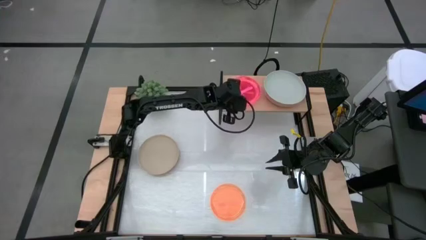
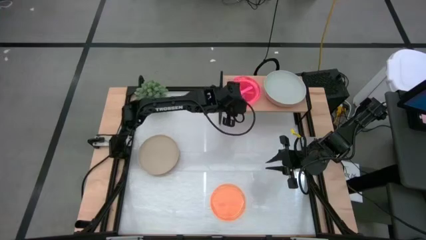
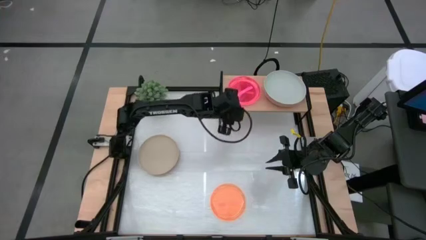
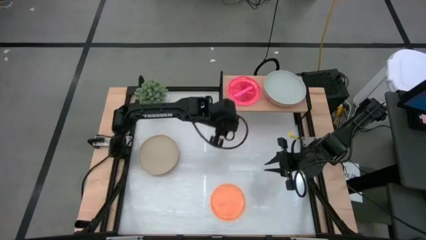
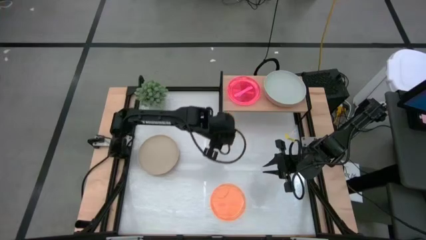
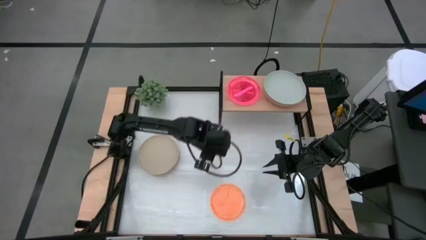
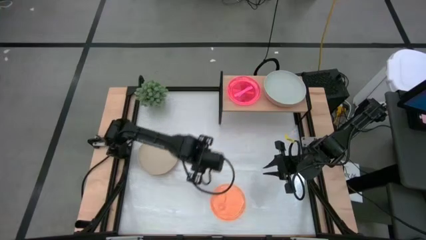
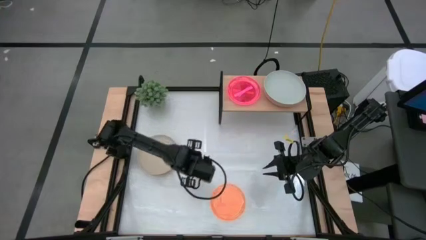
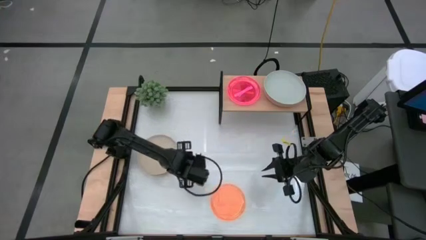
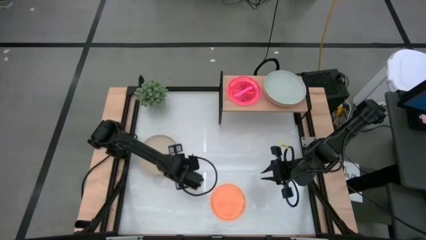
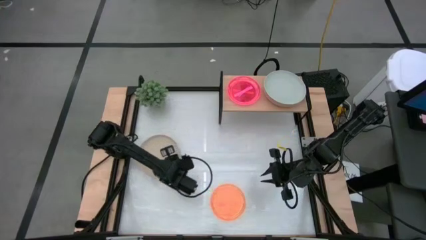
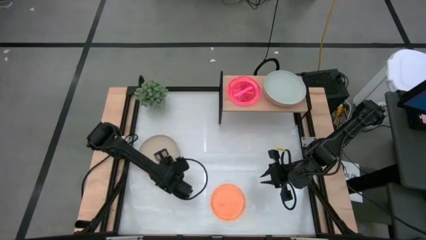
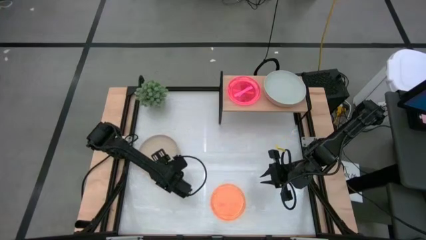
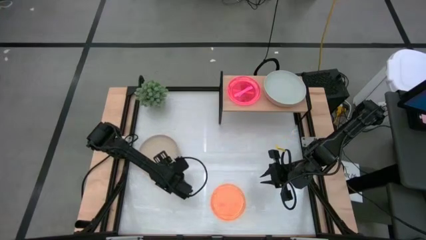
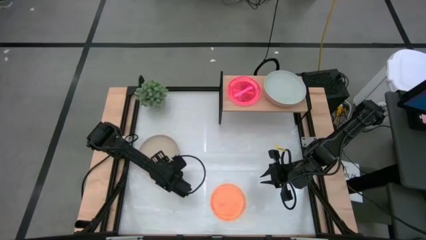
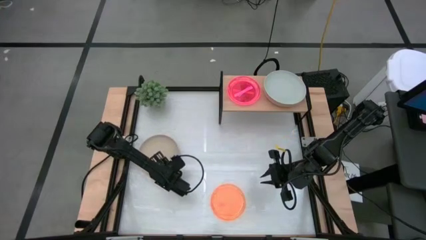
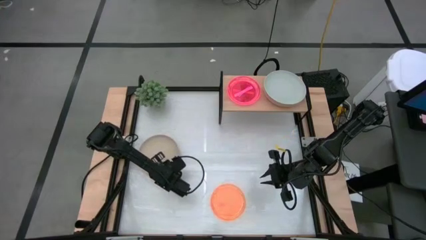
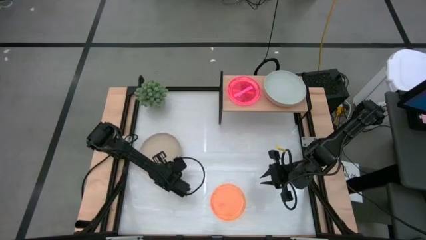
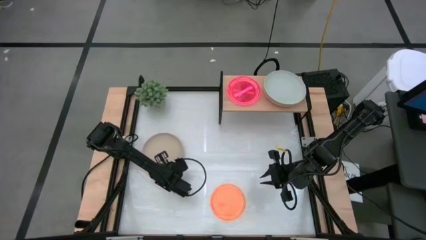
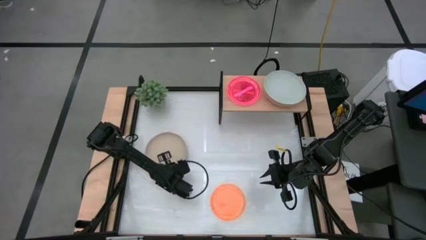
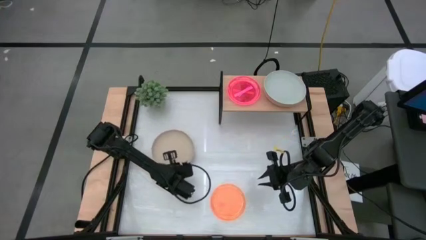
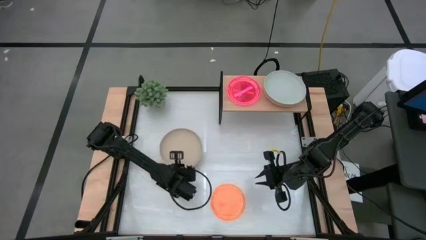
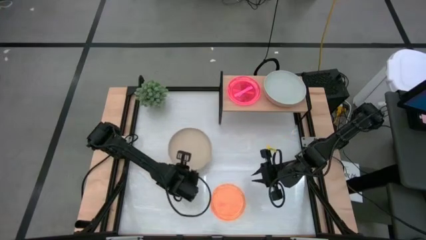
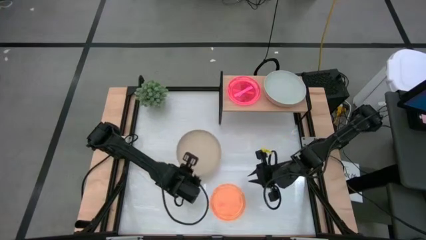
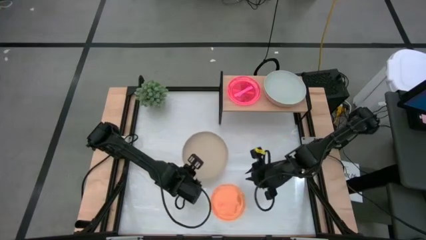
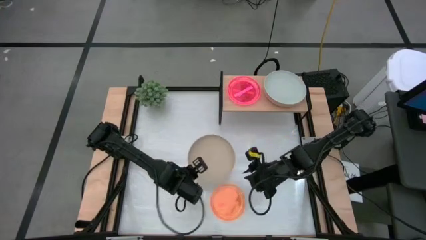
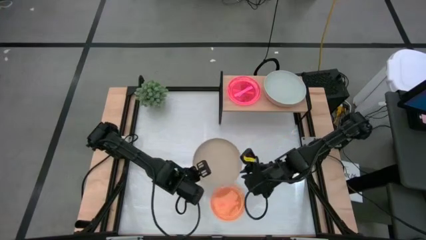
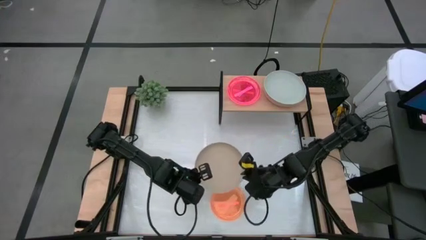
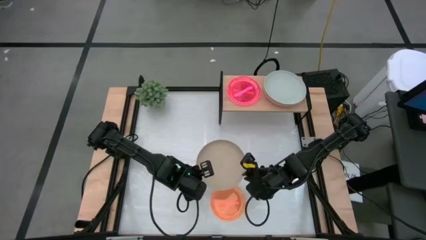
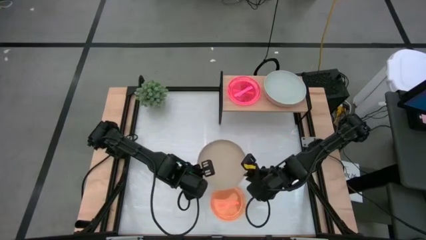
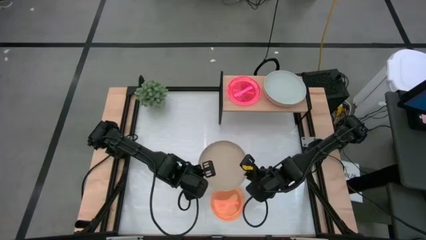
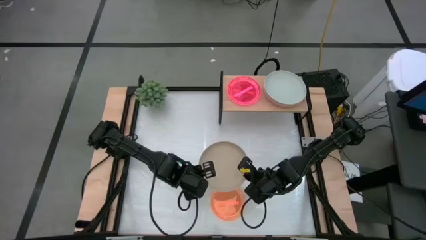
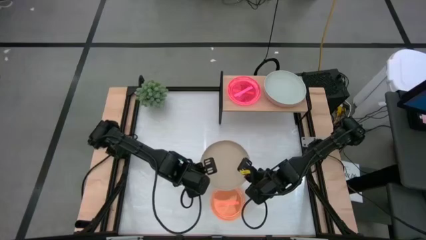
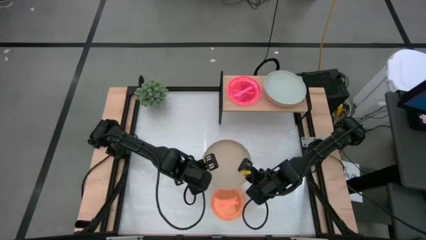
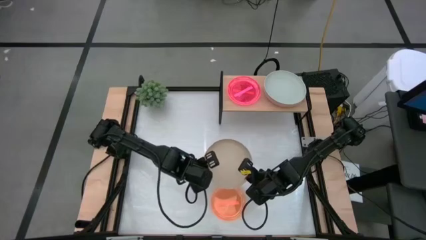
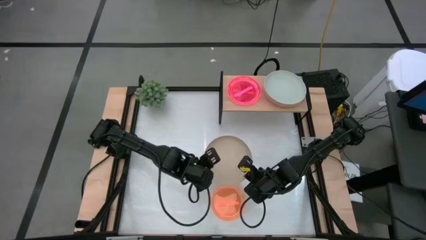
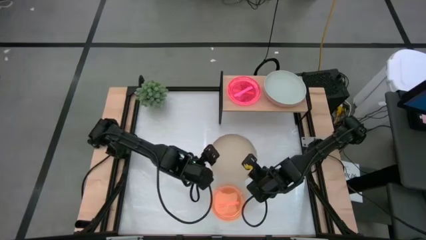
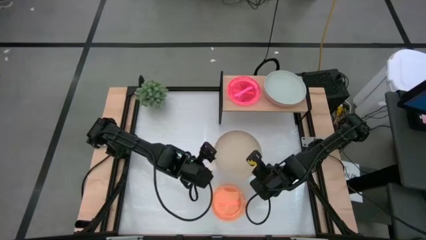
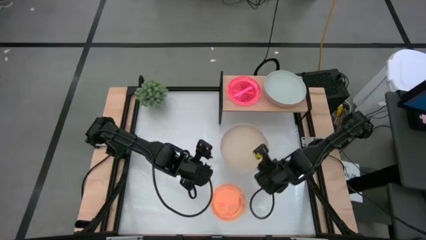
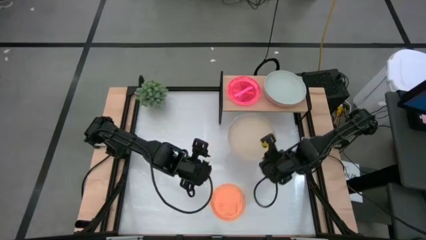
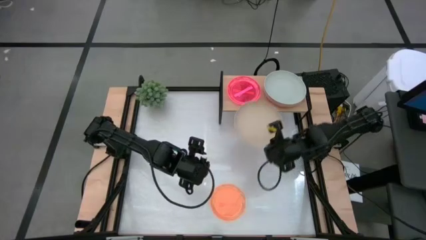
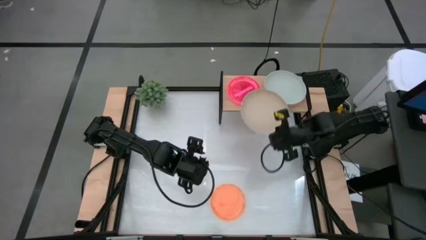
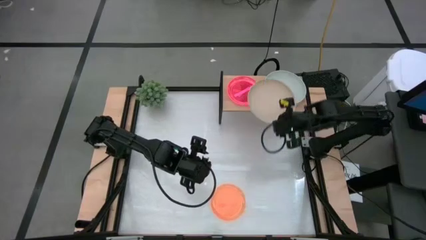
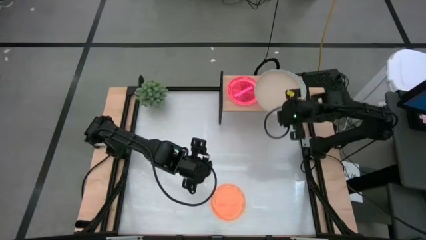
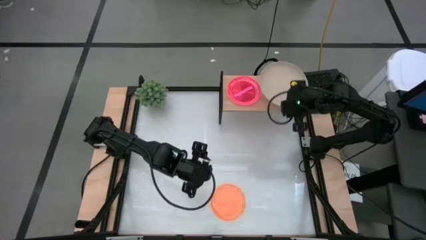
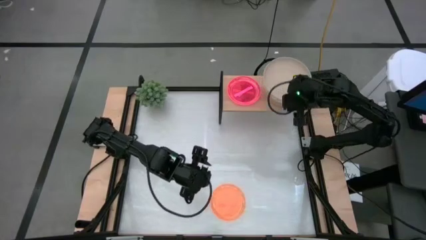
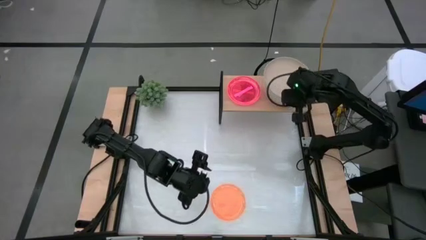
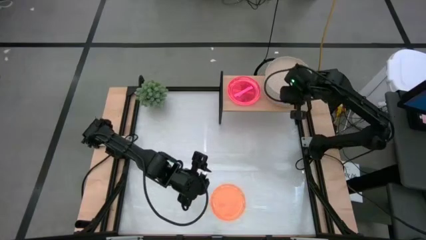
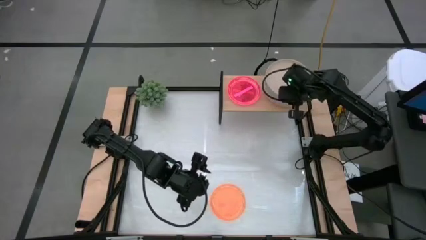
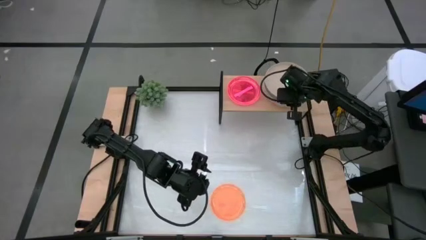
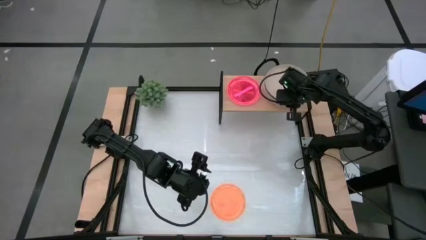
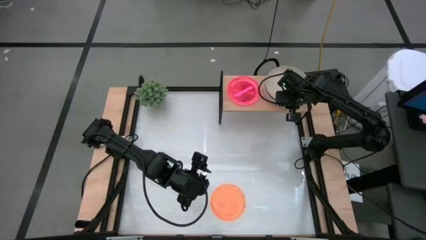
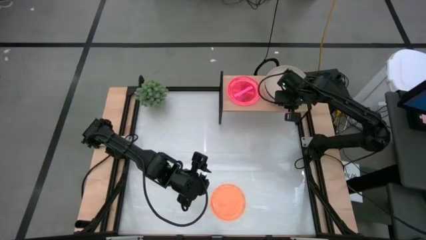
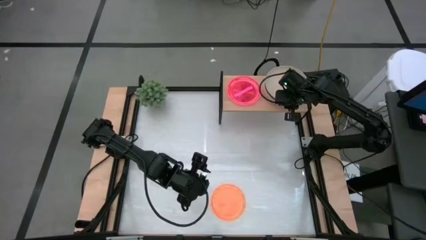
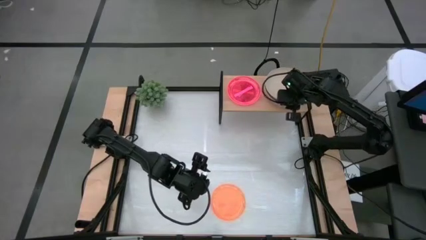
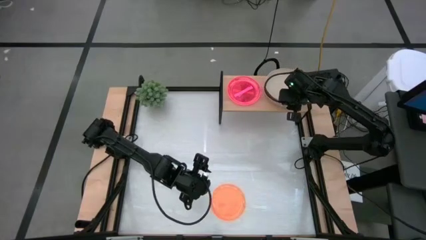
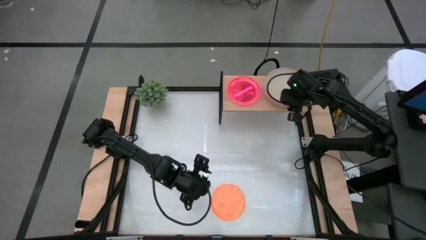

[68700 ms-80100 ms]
Task: Place and stack plates onto a shelf
Stack the brown plate on top of the gray plate on the shelf

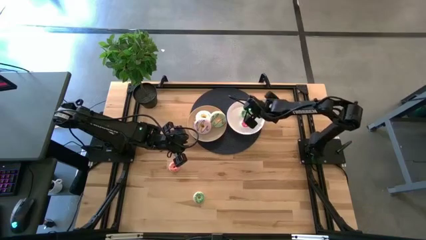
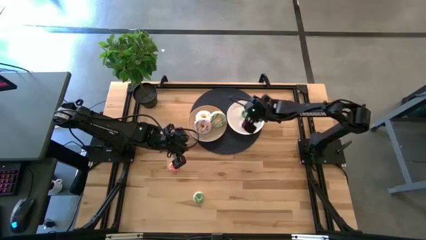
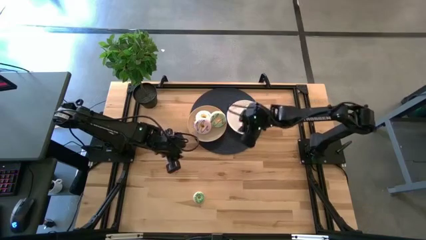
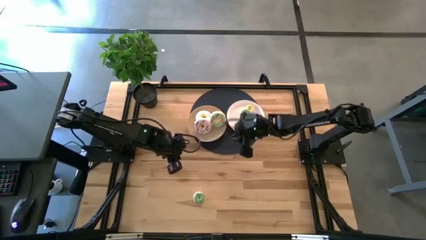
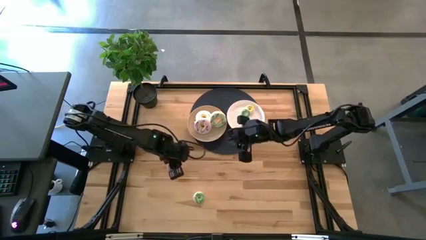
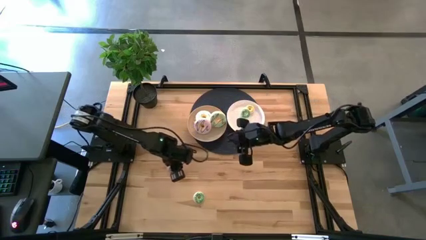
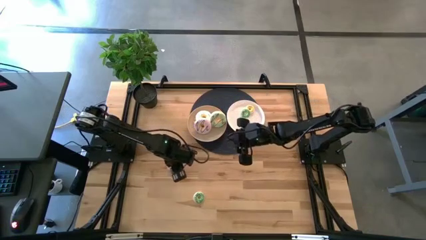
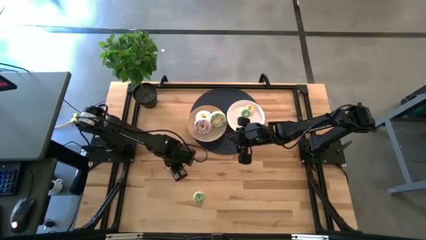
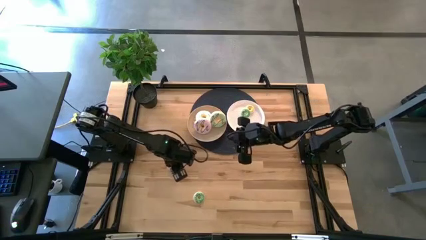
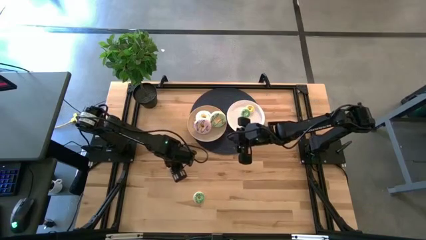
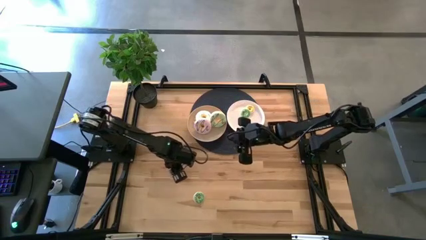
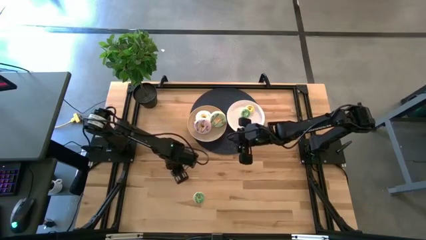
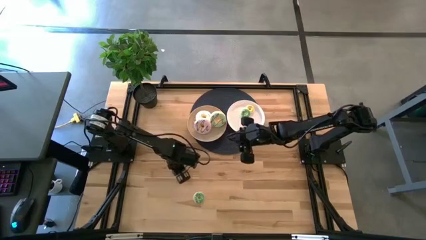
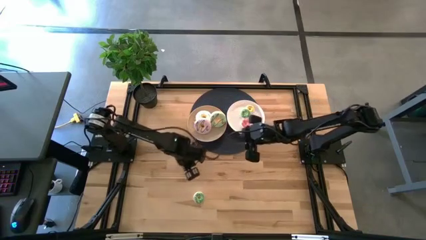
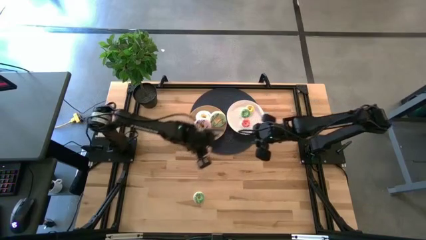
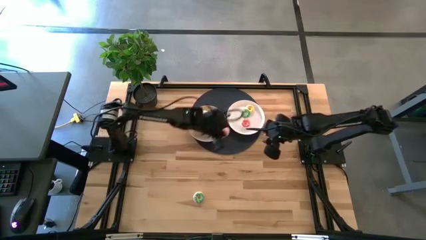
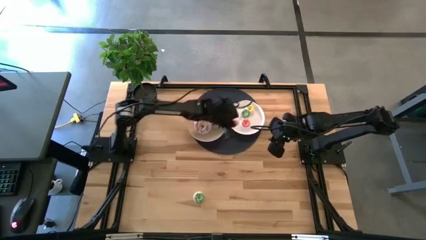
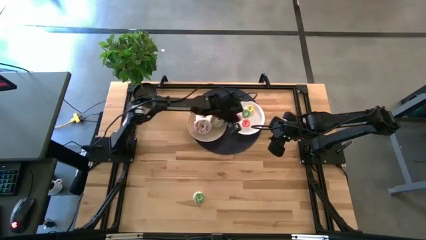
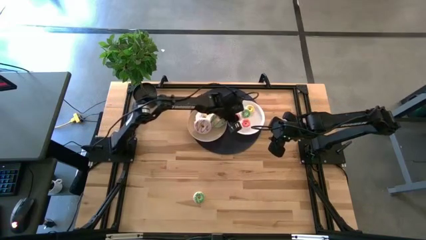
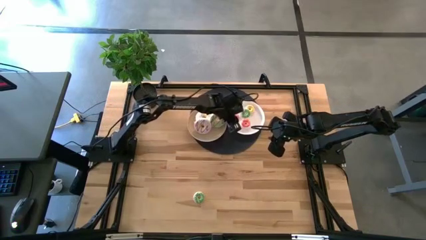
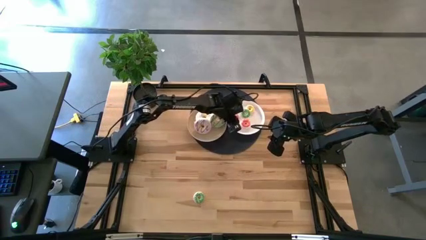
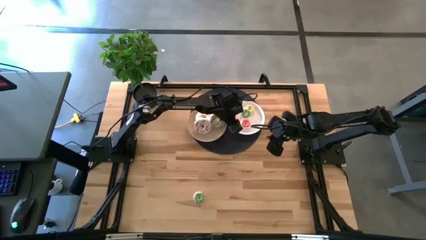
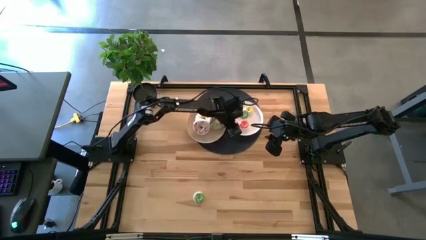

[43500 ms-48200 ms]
Task: Pick & Place donuts
Put the small pink donut on the white plate
